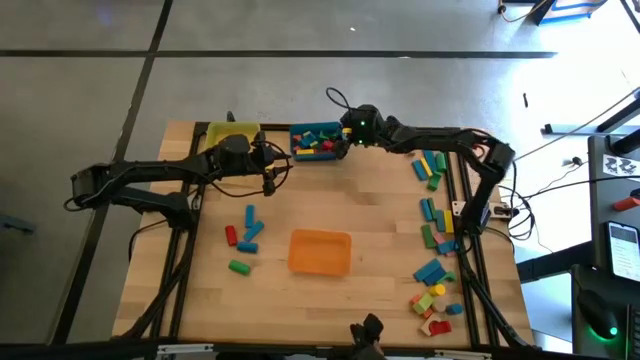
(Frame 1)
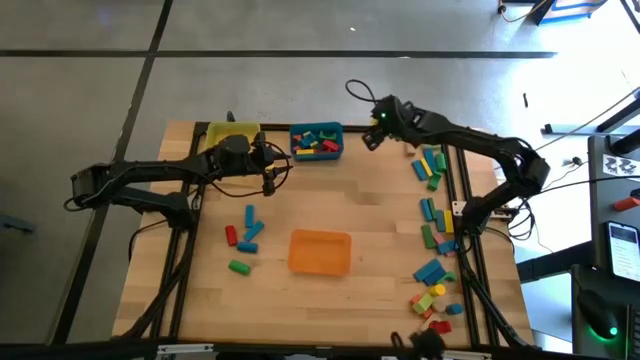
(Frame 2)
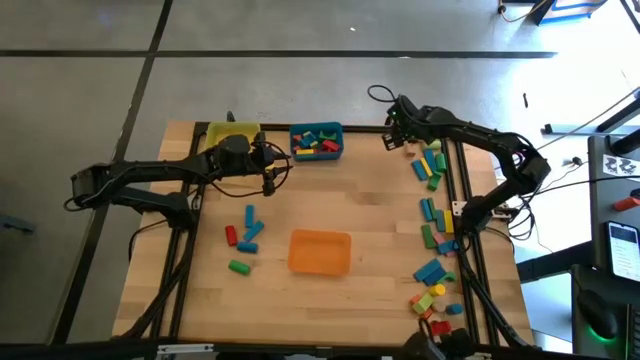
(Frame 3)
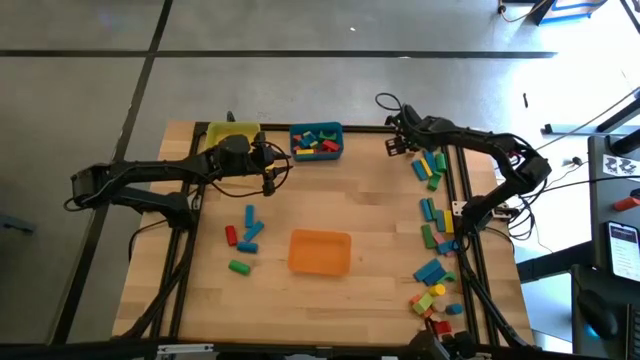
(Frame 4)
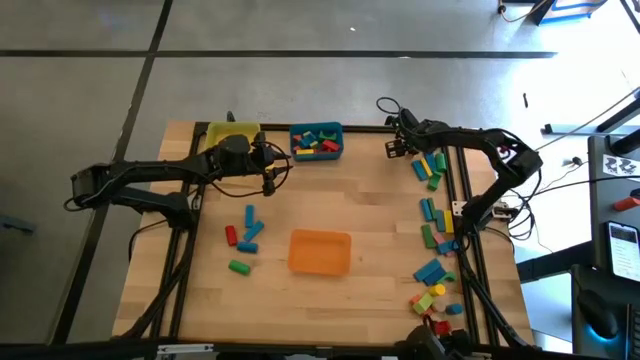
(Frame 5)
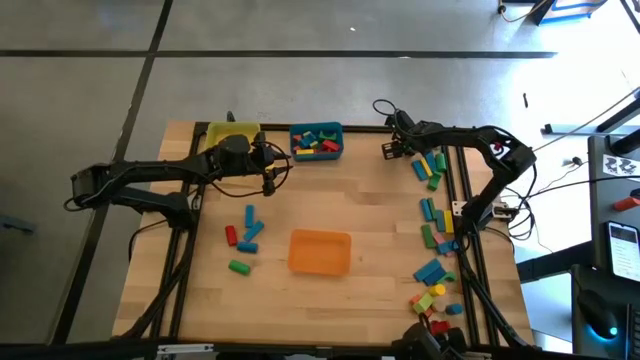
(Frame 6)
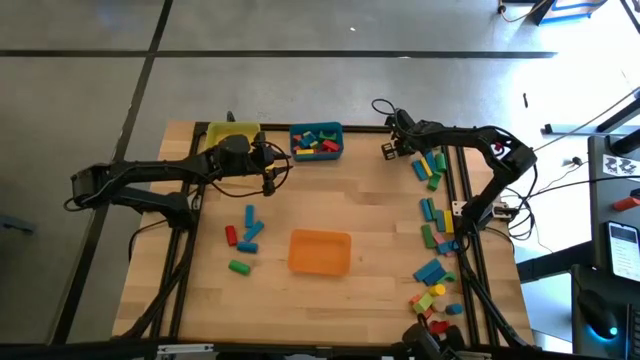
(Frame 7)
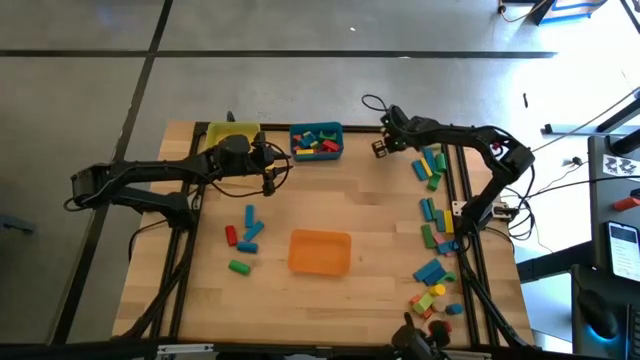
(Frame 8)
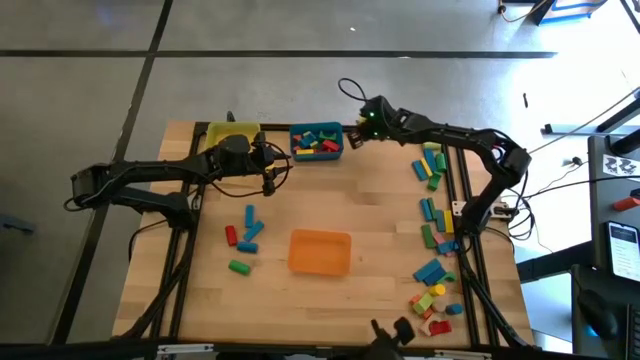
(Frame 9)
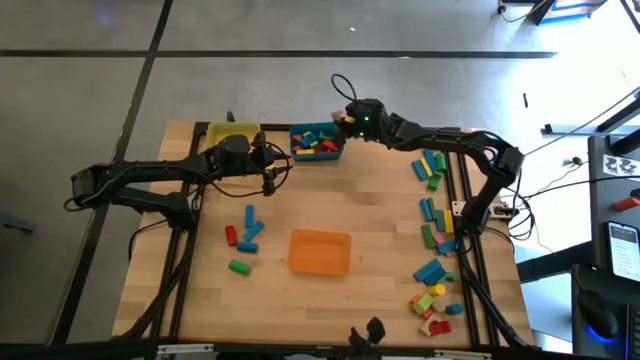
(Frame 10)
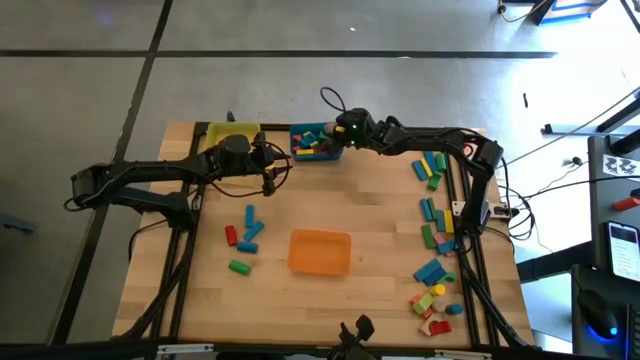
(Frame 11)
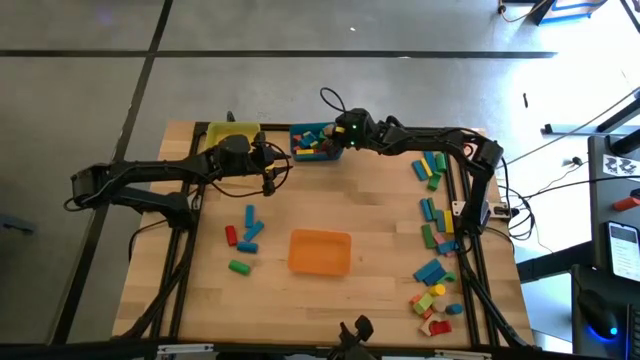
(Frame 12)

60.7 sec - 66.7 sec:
Task: Sort blocks by size
Put the brown arch block into the blue bin

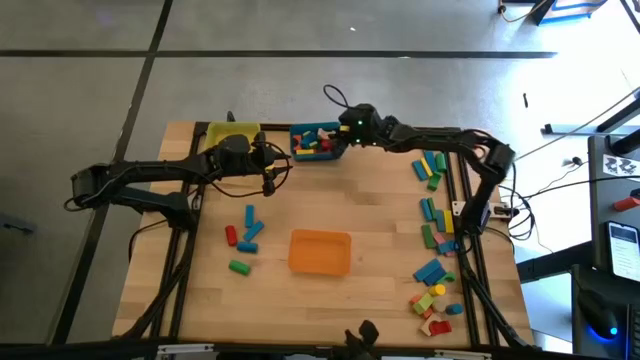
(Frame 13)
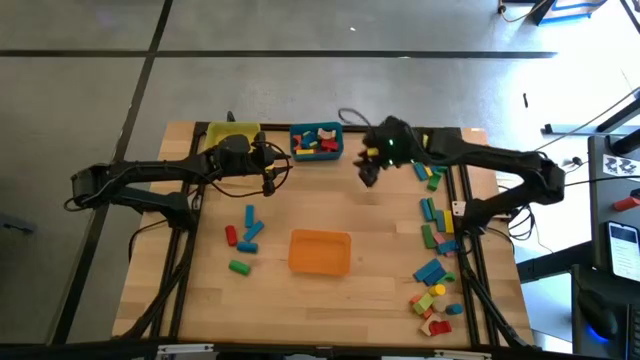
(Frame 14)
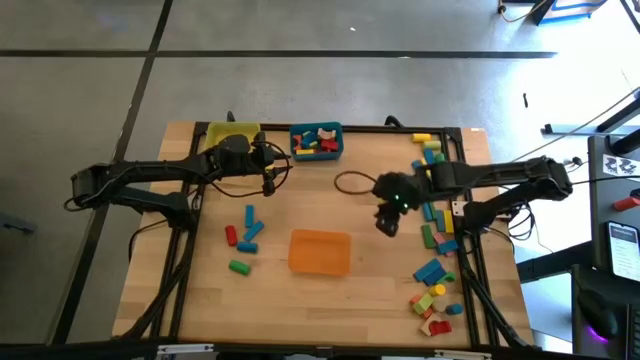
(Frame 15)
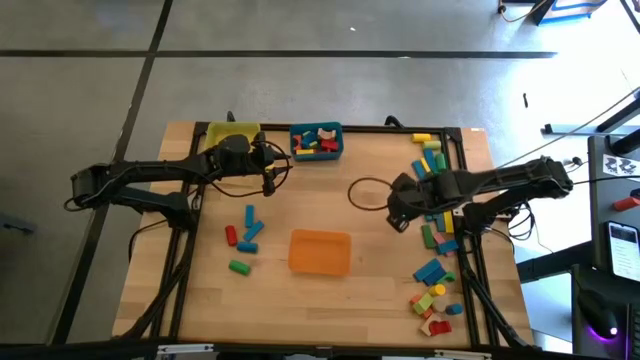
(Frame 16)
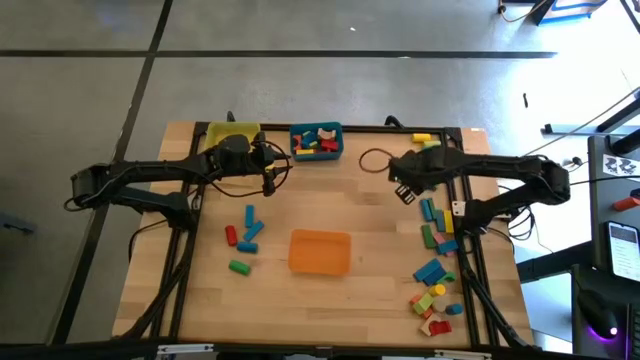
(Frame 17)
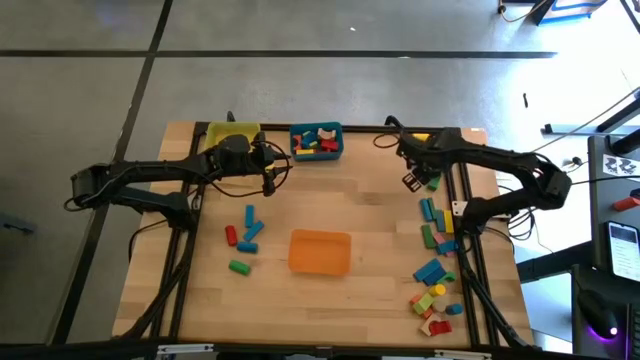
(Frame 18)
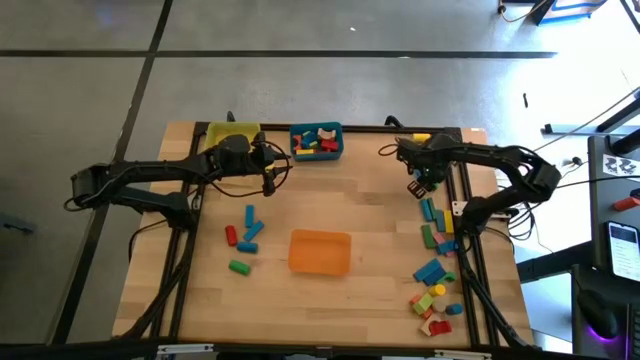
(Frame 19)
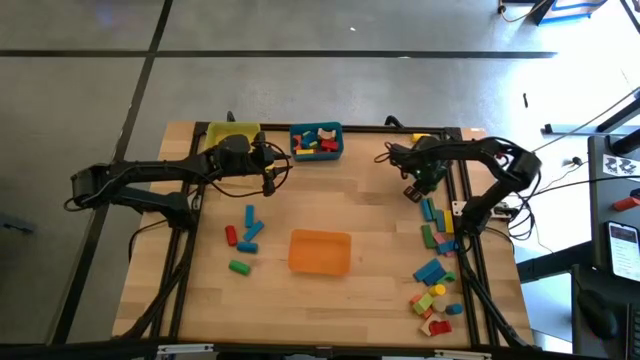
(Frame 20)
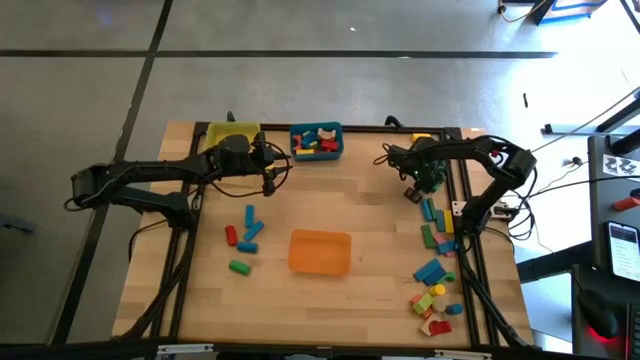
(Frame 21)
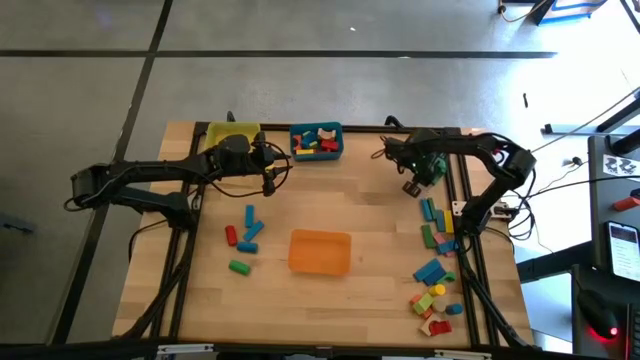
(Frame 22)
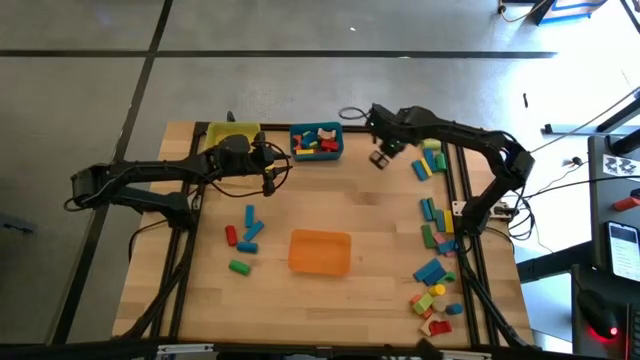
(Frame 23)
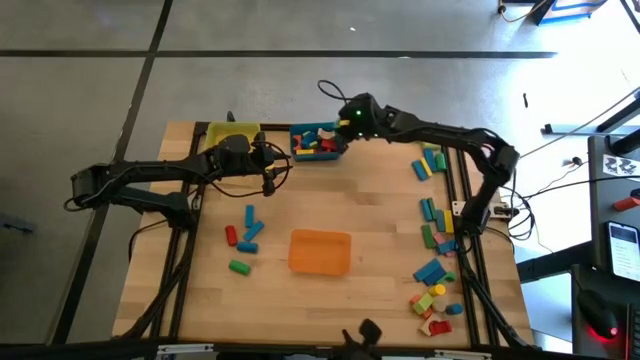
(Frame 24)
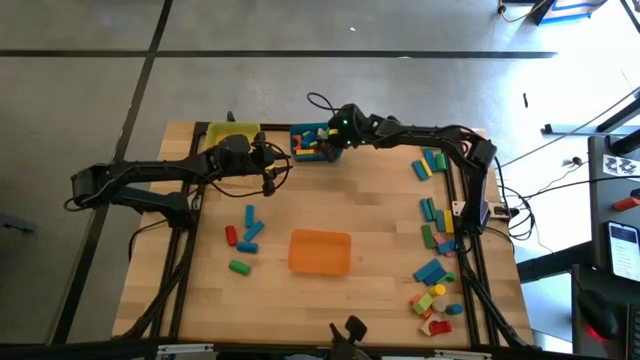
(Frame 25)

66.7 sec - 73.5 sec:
Put the green arch block into the blue bin

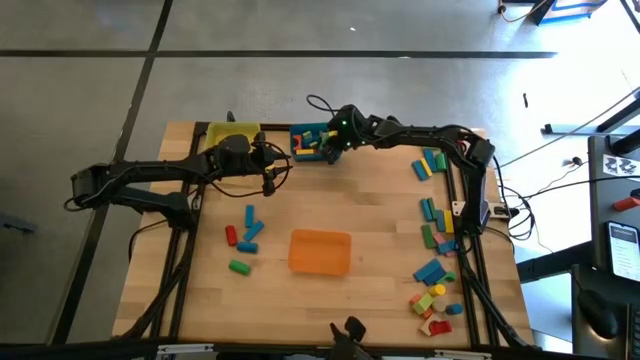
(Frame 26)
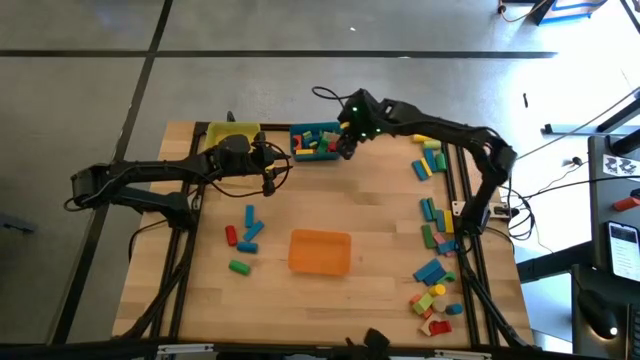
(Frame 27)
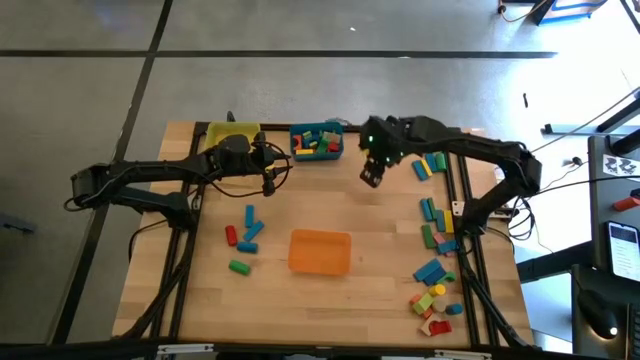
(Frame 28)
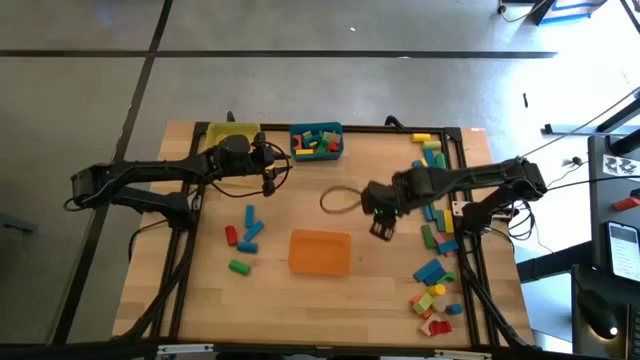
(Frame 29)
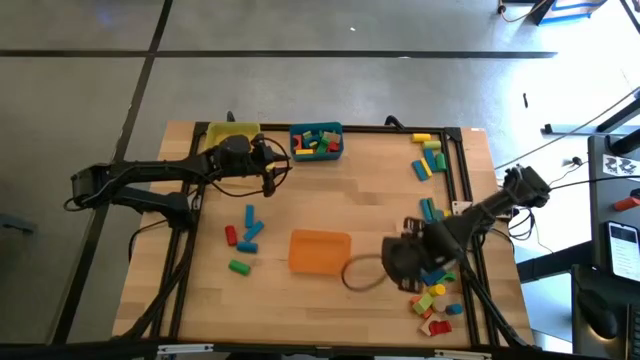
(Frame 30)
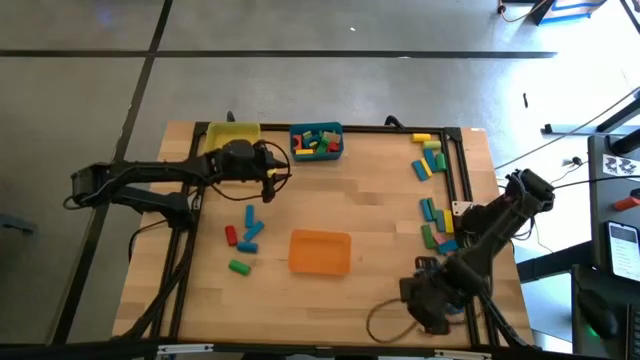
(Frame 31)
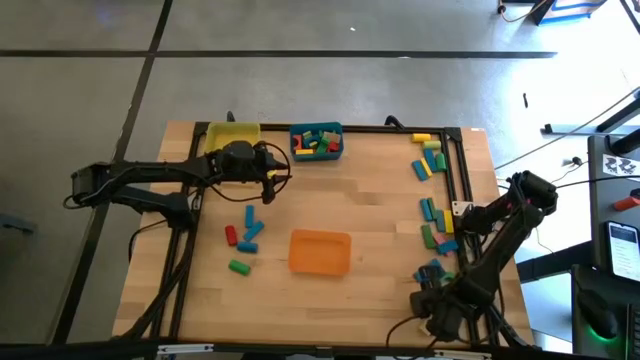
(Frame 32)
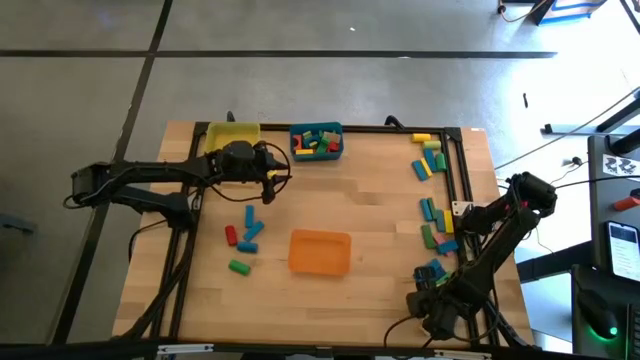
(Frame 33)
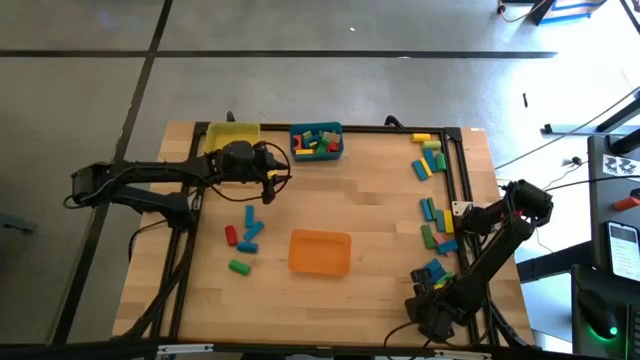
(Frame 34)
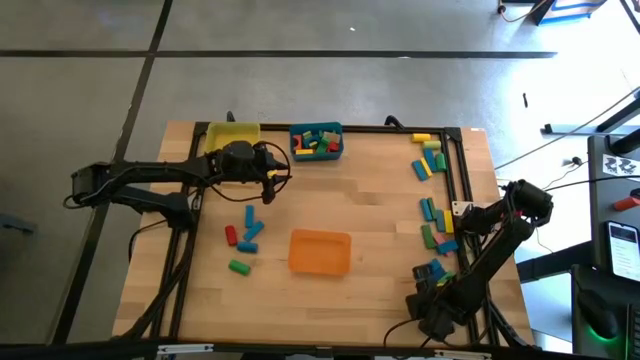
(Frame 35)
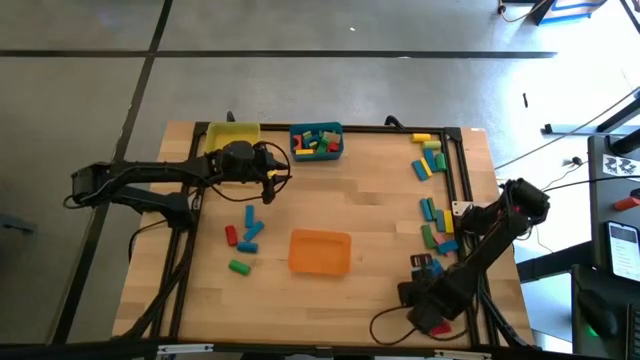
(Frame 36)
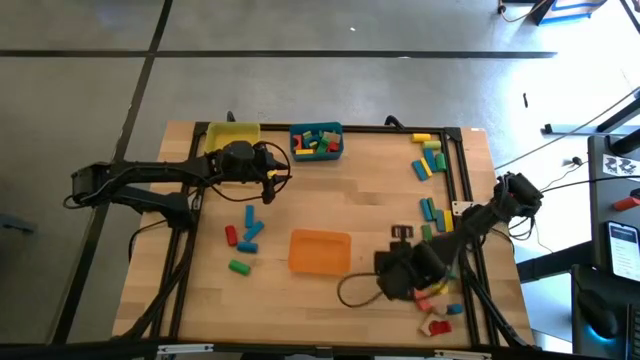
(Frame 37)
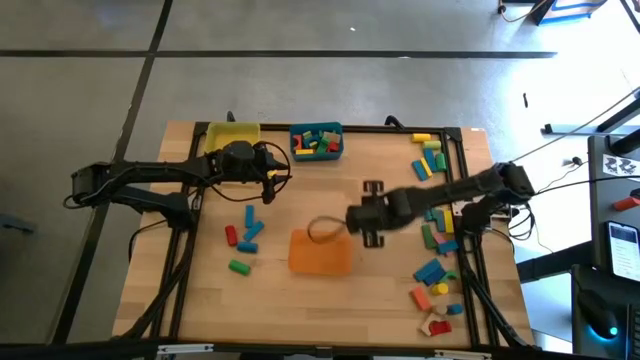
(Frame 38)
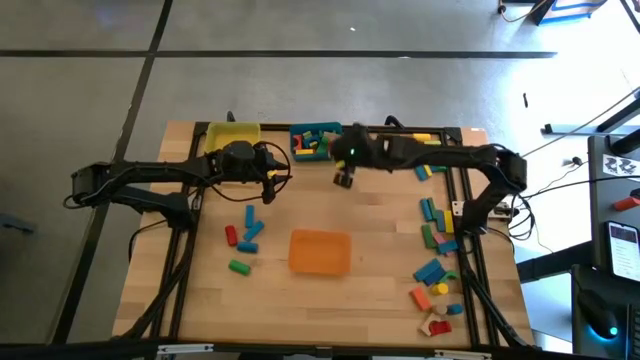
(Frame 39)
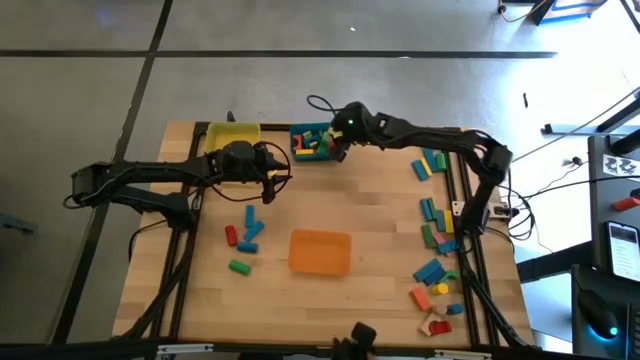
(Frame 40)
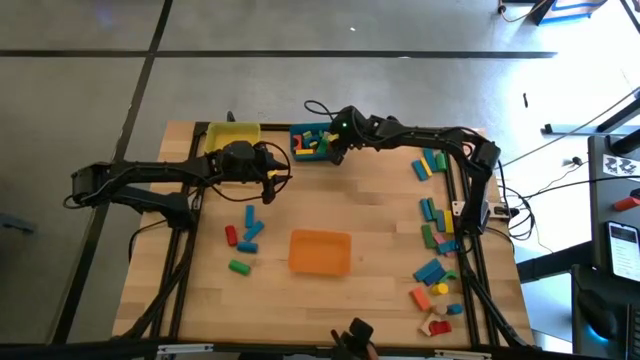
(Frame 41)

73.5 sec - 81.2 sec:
Put the light green arch block into the blue bin

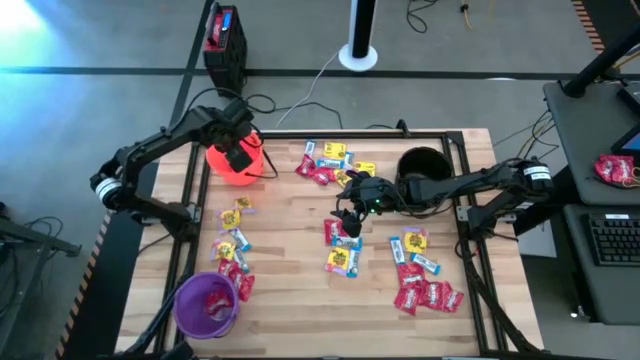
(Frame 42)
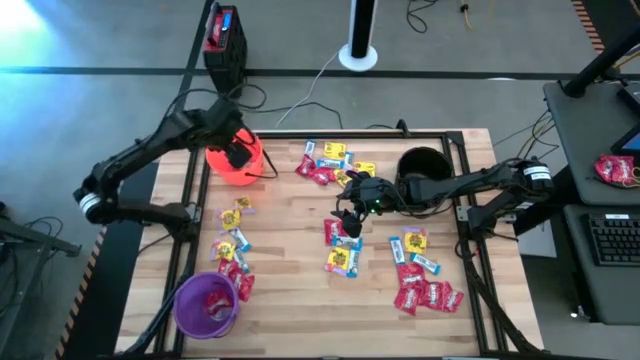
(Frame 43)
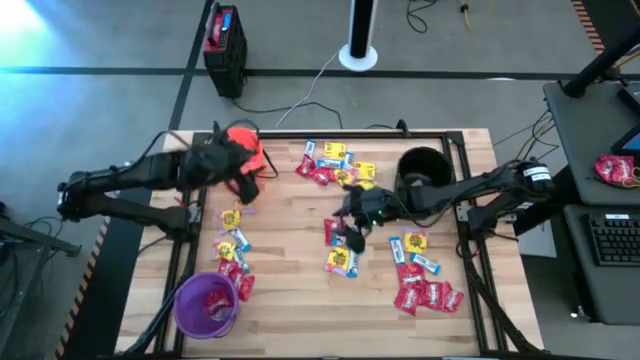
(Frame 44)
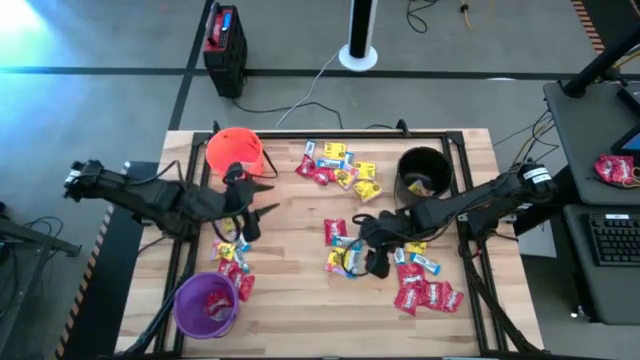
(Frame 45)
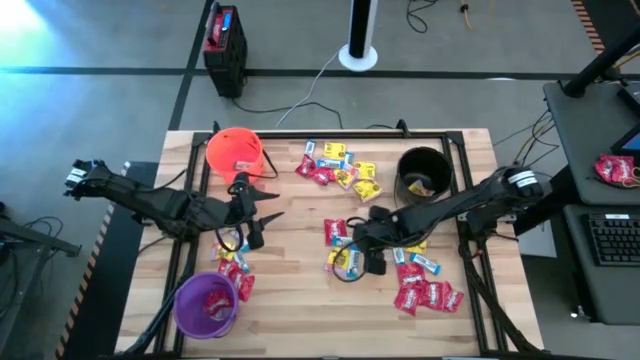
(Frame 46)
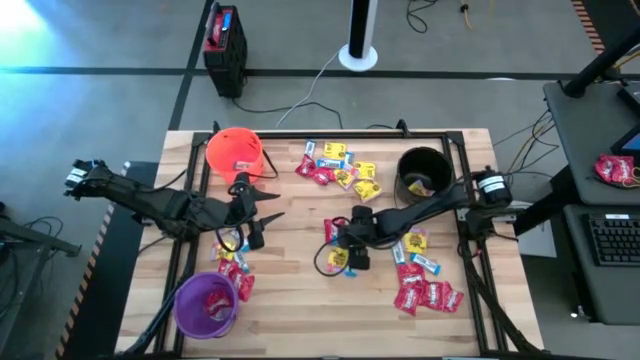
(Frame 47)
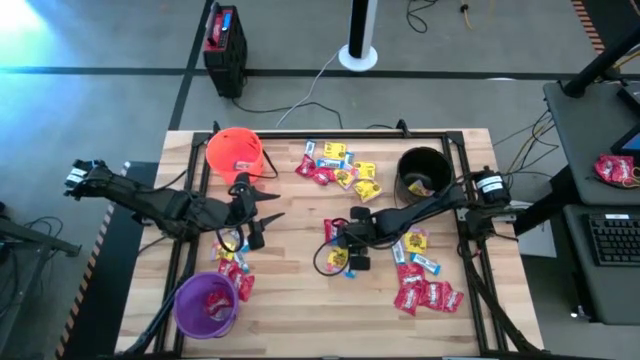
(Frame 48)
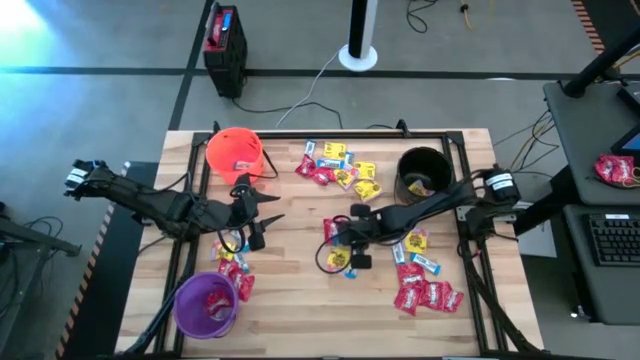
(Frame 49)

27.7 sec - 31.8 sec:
Task: Sort candy by brand, put in halloween buckets
Put the white chocolate bar into the orange bucket
